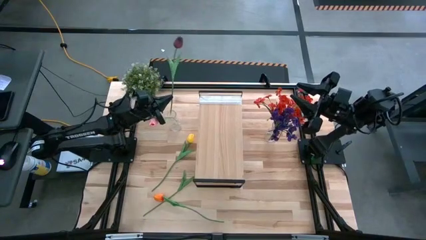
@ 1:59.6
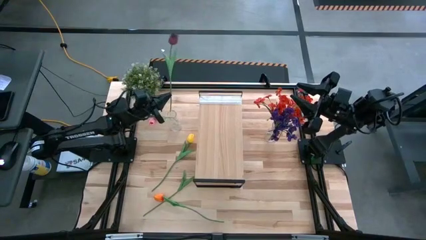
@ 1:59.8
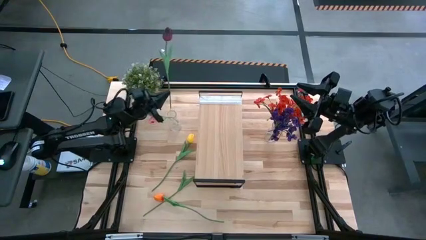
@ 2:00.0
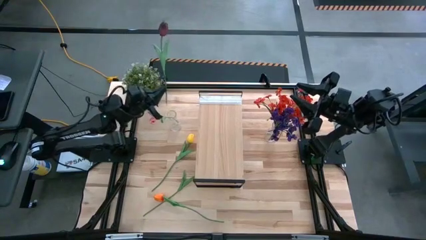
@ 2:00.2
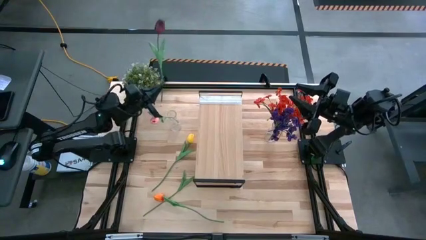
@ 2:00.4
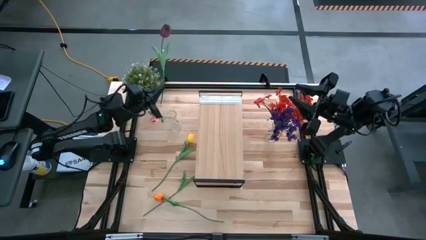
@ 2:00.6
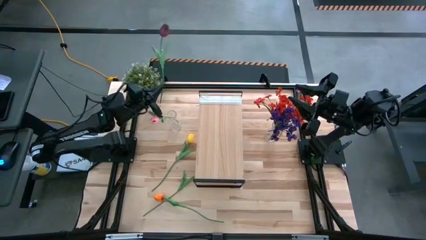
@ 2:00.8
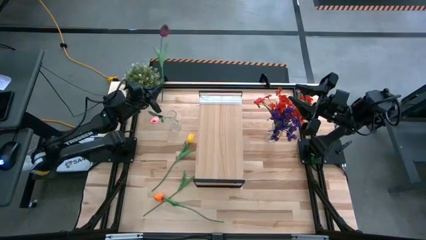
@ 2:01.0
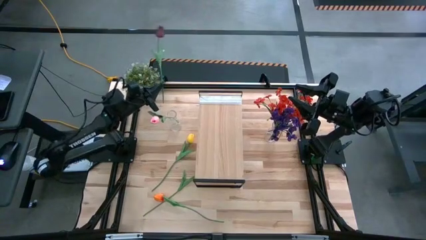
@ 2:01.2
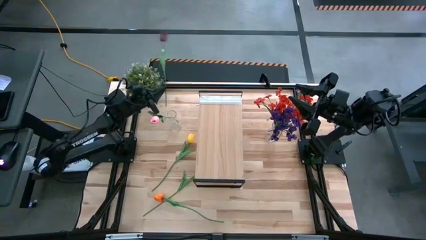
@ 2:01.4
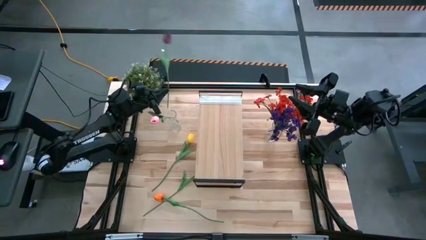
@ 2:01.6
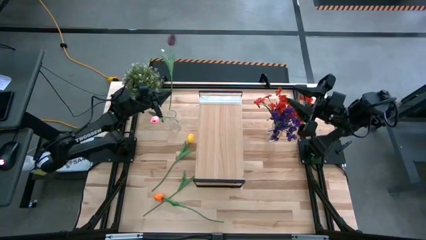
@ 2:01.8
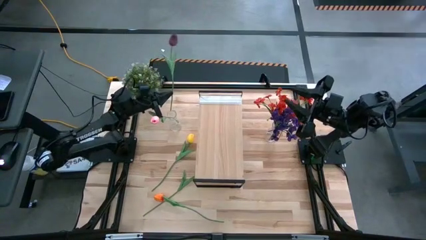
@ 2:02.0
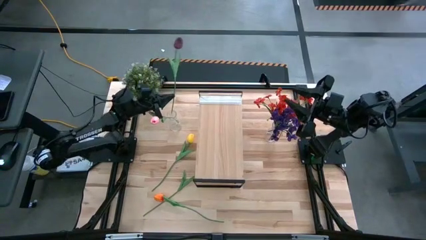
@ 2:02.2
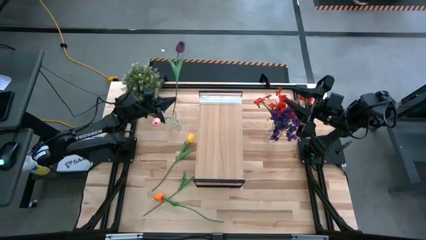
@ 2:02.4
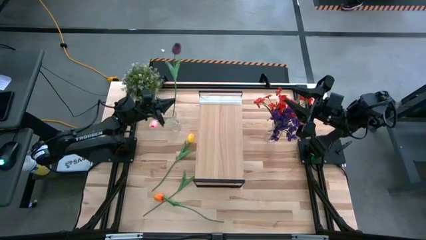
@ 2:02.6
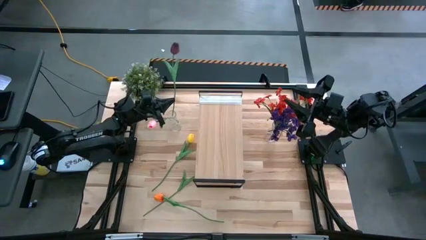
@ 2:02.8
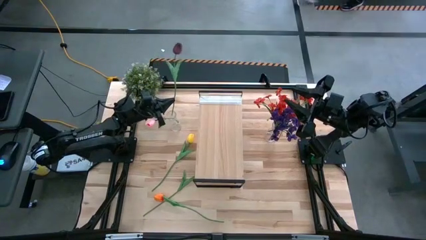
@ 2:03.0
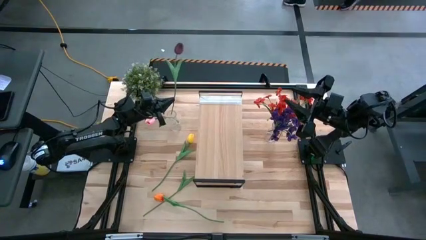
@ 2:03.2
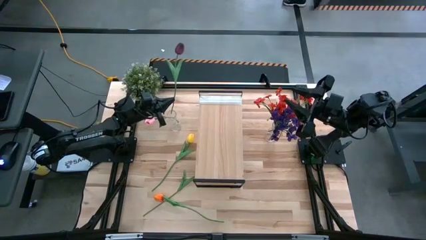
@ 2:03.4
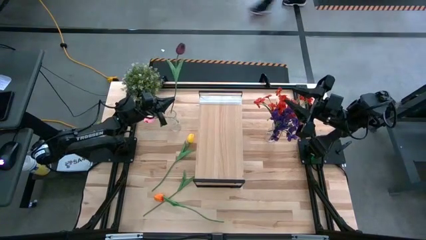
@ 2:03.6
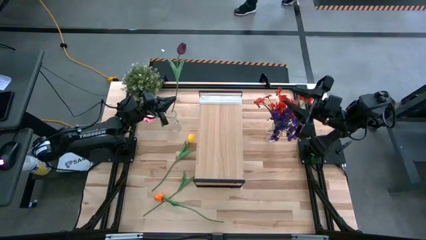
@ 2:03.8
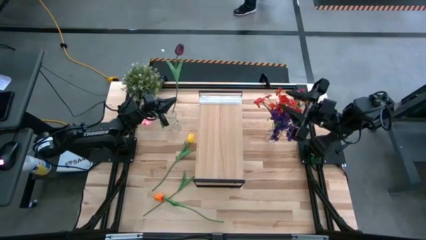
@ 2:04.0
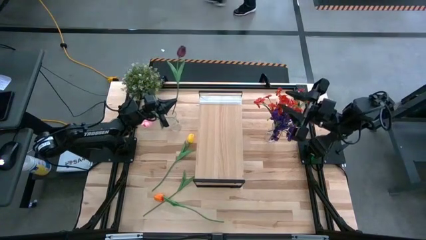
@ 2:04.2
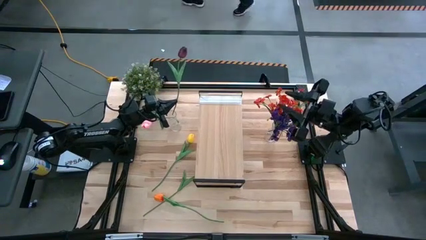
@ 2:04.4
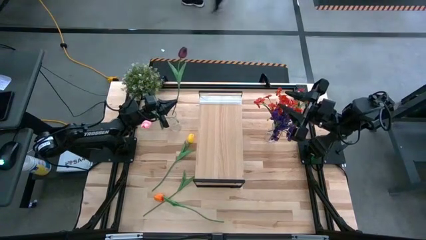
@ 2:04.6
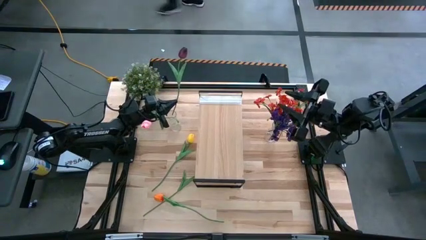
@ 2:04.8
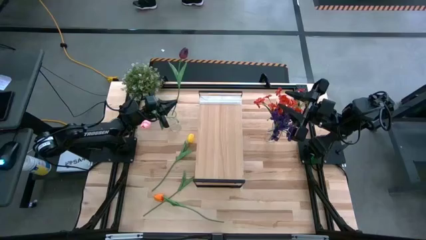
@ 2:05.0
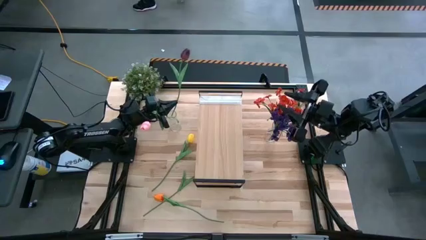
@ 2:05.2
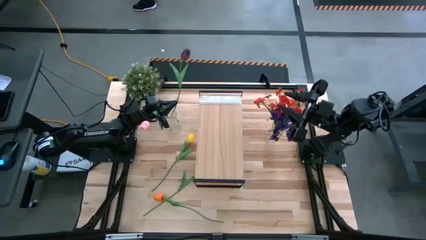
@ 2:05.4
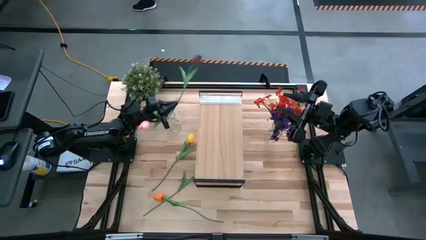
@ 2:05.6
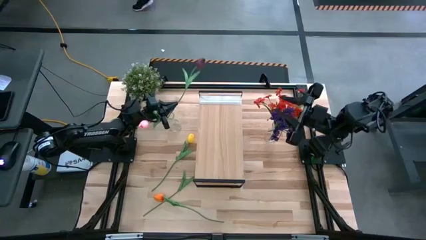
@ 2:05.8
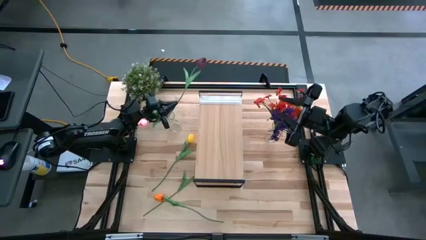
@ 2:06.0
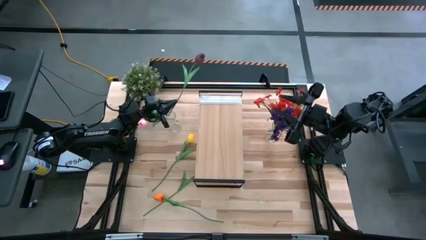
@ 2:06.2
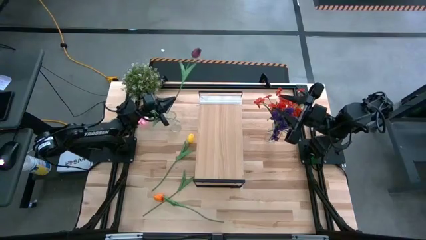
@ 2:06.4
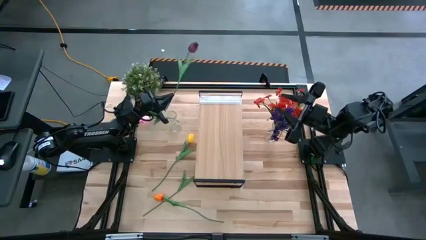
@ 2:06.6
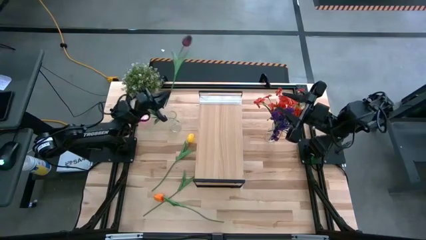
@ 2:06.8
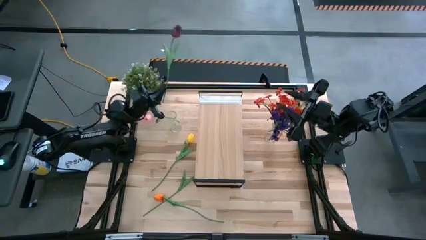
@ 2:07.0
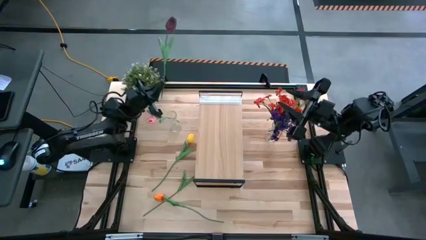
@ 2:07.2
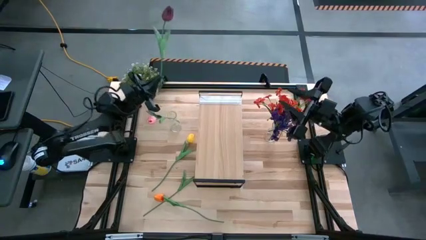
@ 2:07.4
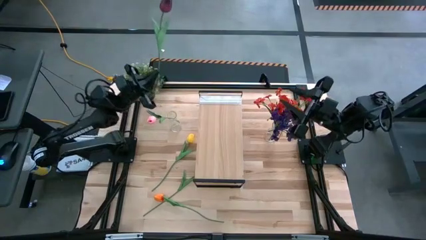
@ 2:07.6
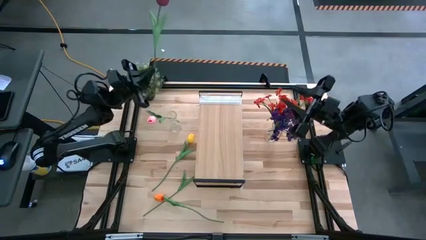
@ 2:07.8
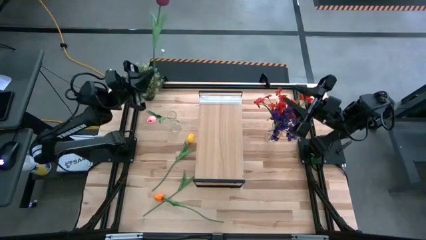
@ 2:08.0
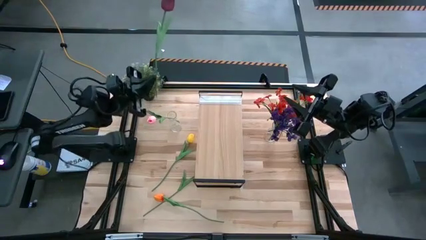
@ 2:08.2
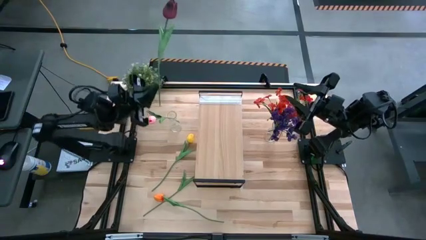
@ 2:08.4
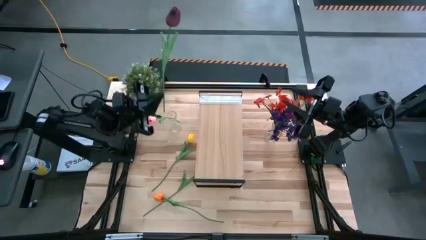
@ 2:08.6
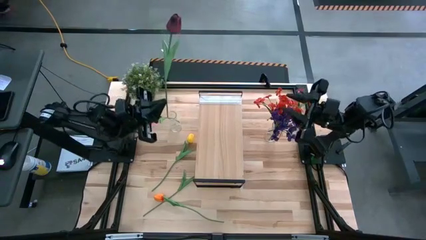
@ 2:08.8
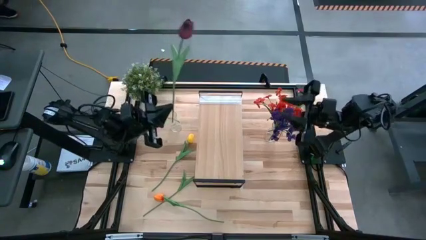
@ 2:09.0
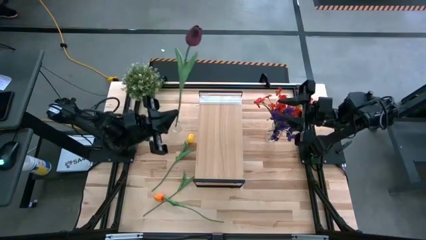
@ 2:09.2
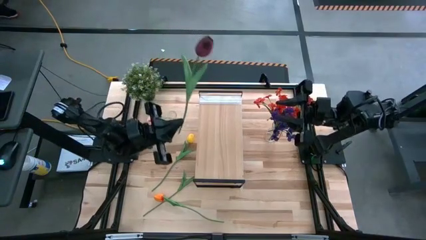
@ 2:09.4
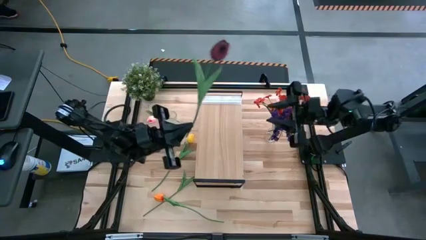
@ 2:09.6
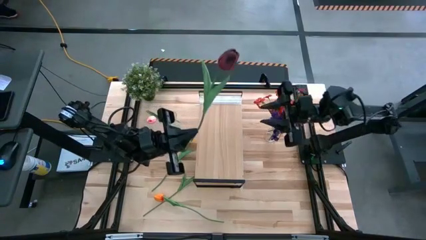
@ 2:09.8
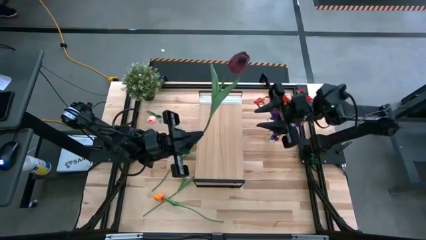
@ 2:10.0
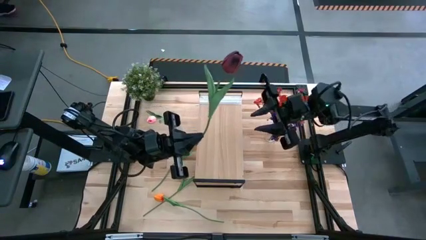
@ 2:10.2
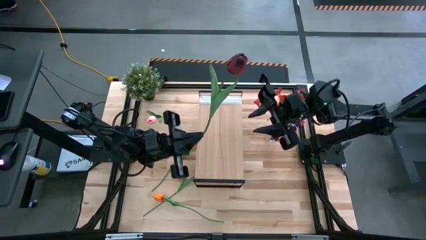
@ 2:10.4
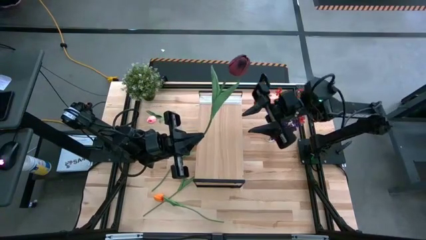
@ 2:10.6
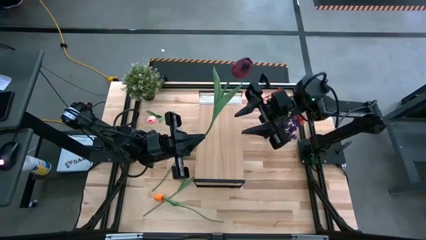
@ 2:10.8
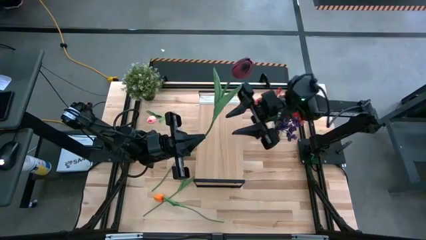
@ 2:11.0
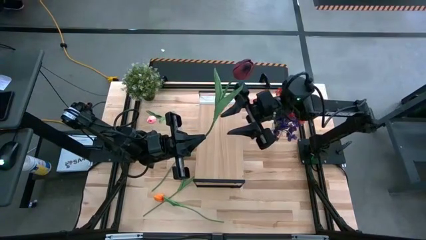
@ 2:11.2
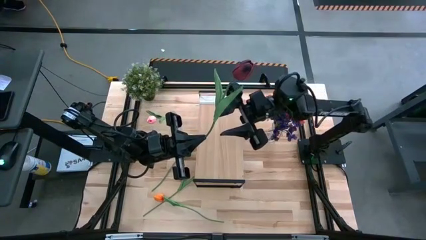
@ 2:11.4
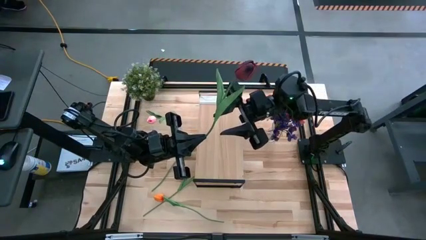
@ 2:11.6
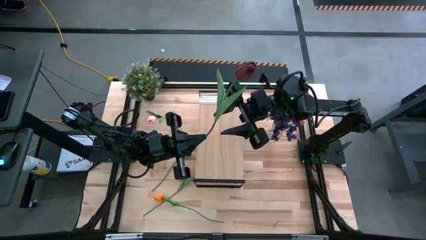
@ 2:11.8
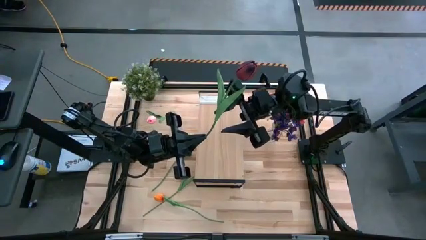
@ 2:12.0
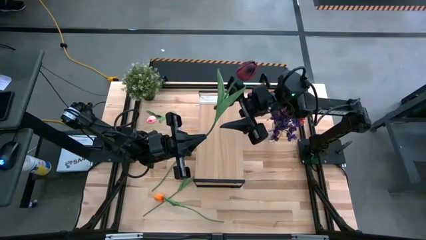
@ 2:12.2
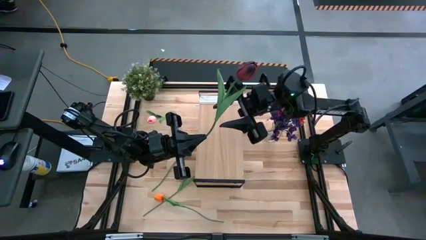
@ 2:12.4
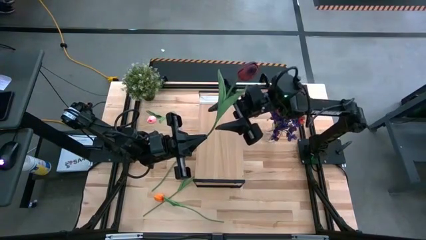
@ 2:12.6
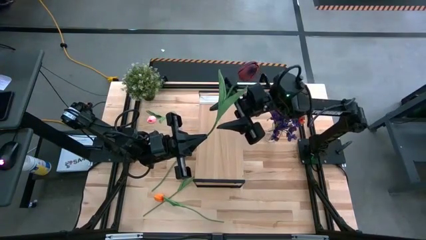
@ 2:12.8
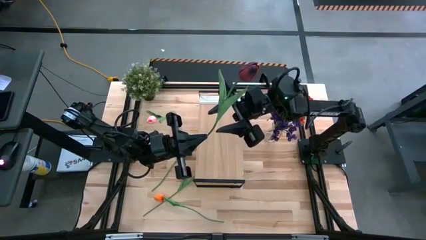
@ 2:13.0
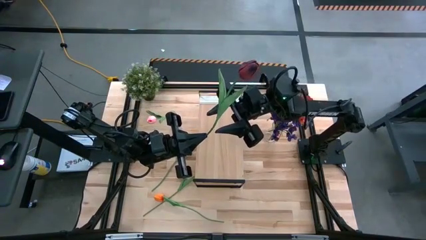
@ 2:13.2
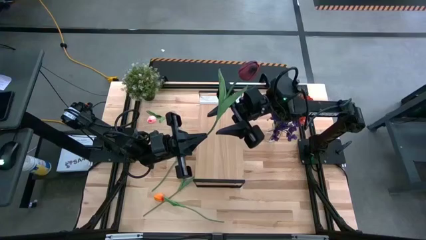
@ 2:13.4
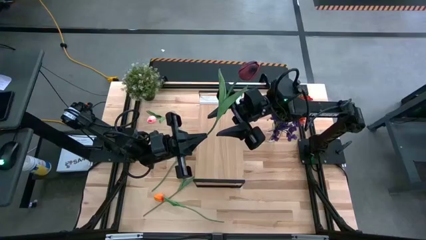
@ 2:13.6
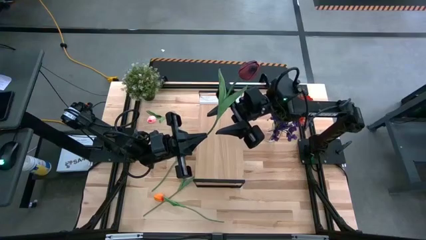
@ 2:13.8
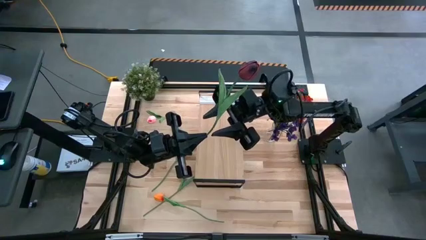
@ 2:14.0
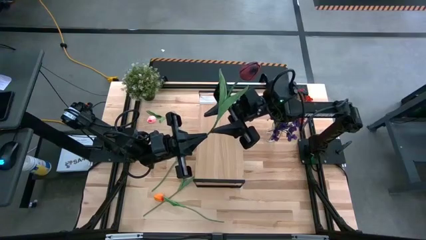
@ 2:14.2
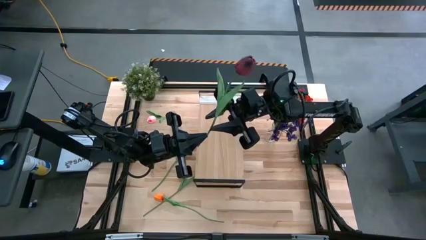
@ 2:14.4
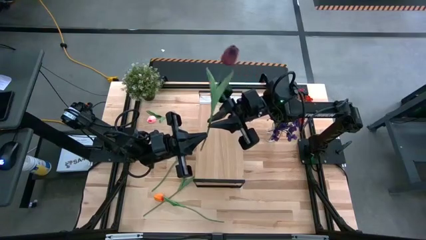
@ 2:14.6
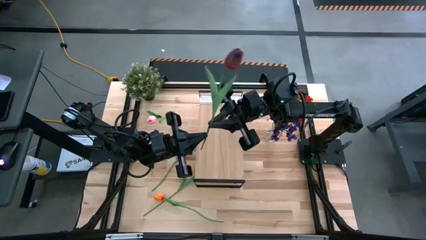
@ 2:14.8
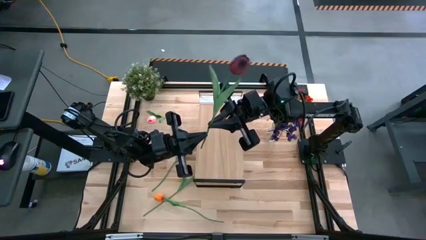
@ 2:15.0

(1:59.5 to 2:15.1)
Task: Pick and place flowers into a vace then onto a shelf
Put the dark red tulip into the left transparent vase
